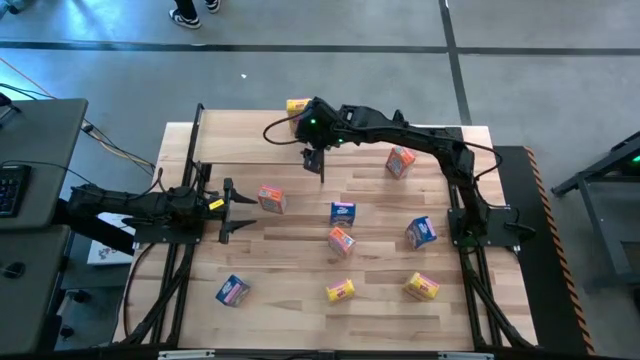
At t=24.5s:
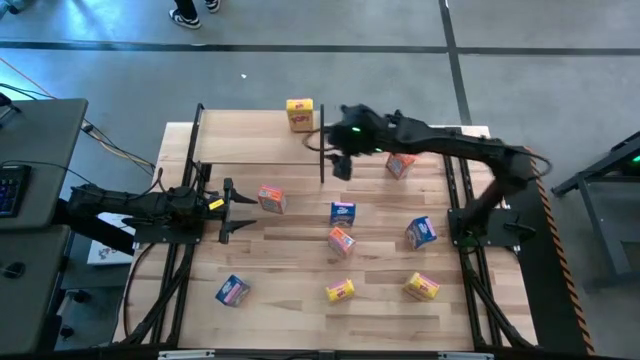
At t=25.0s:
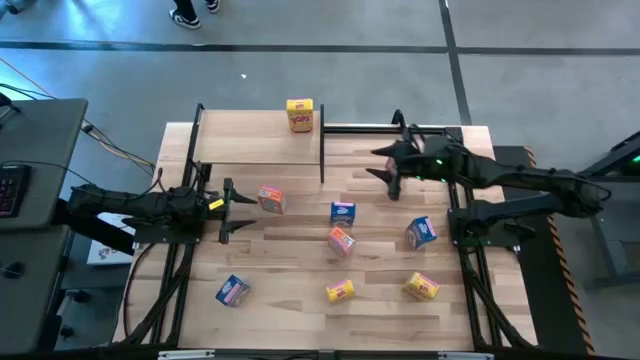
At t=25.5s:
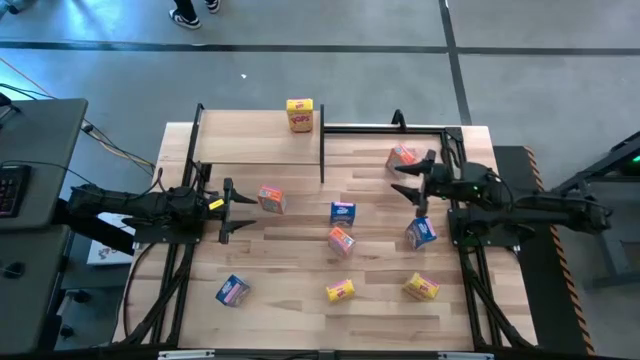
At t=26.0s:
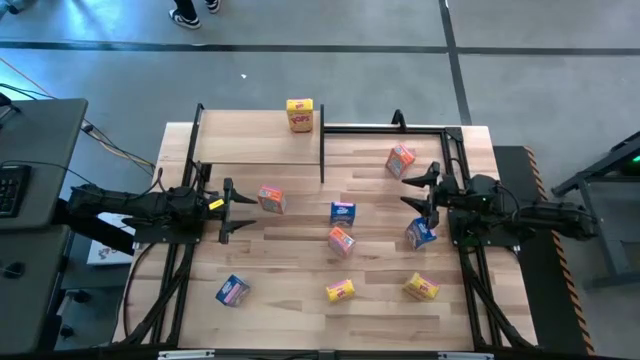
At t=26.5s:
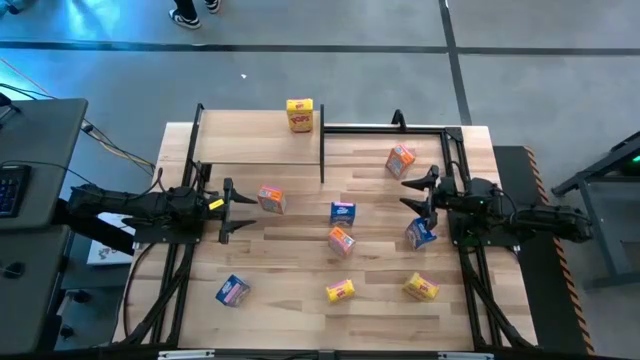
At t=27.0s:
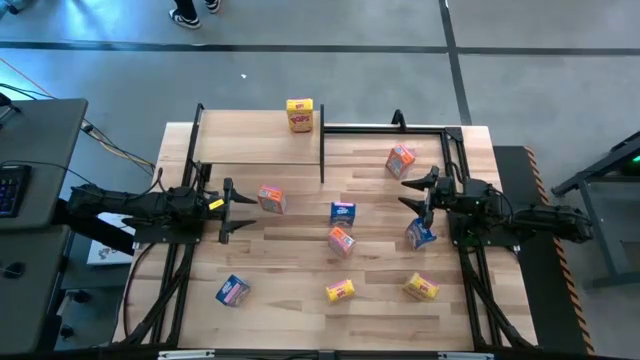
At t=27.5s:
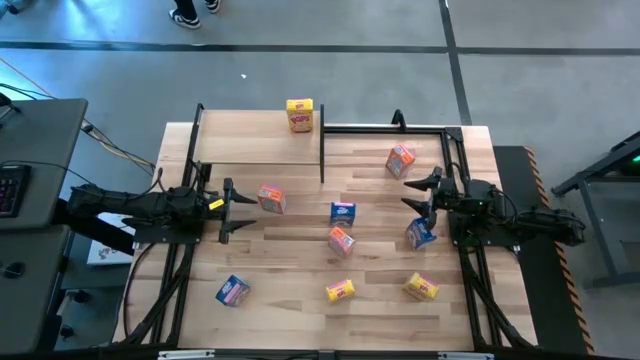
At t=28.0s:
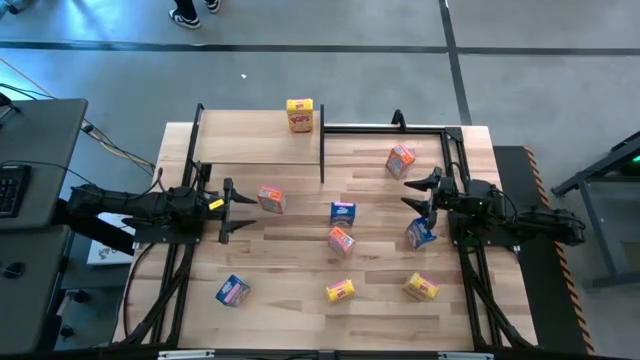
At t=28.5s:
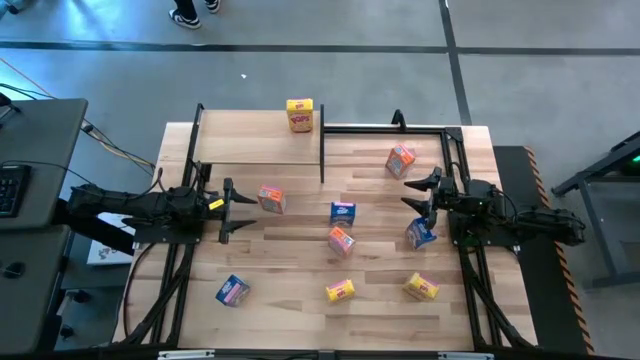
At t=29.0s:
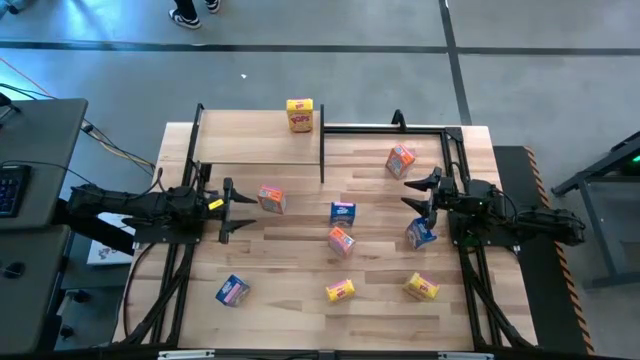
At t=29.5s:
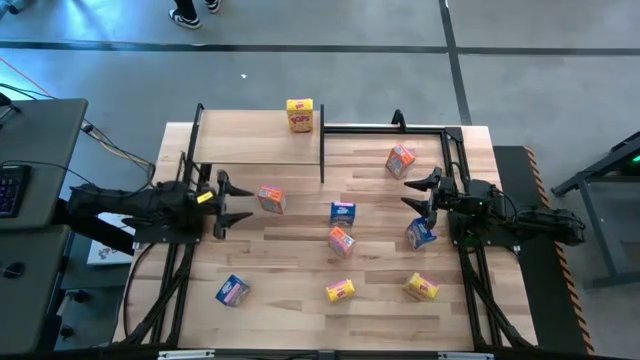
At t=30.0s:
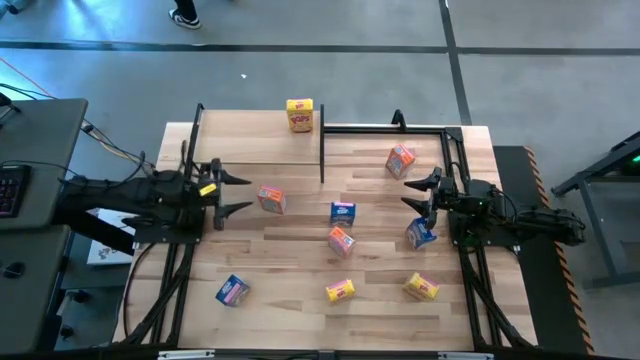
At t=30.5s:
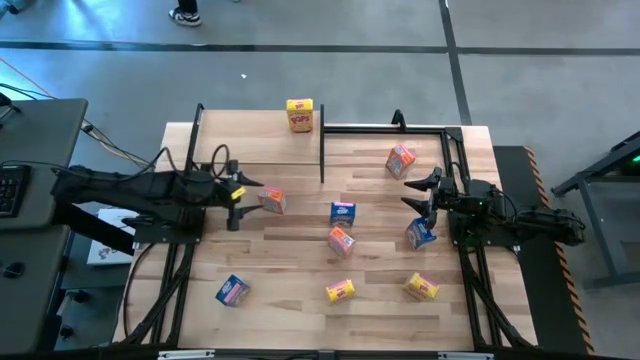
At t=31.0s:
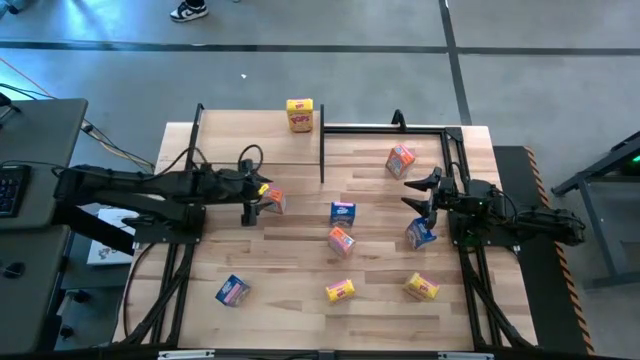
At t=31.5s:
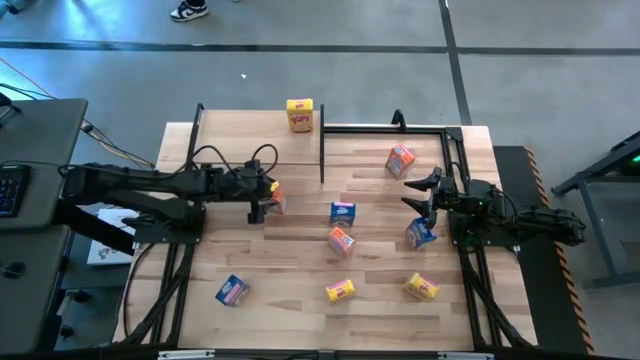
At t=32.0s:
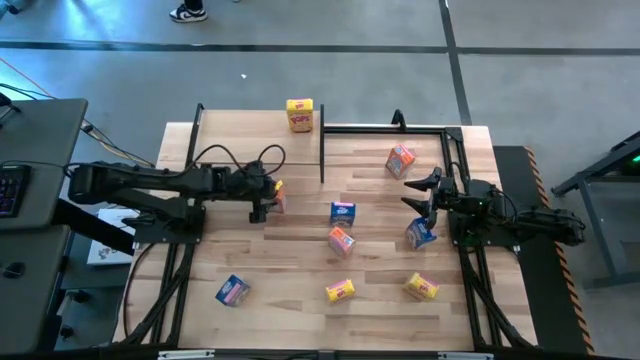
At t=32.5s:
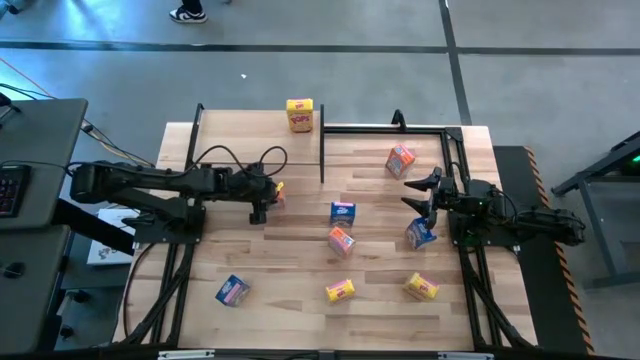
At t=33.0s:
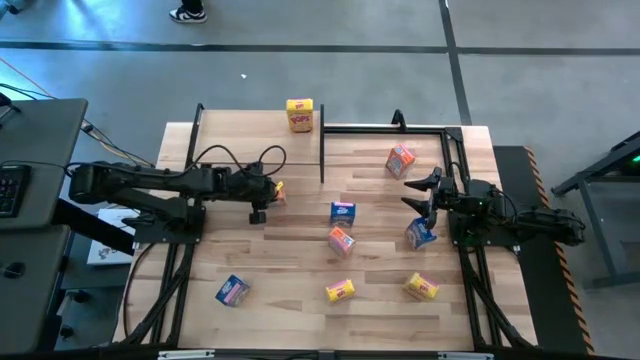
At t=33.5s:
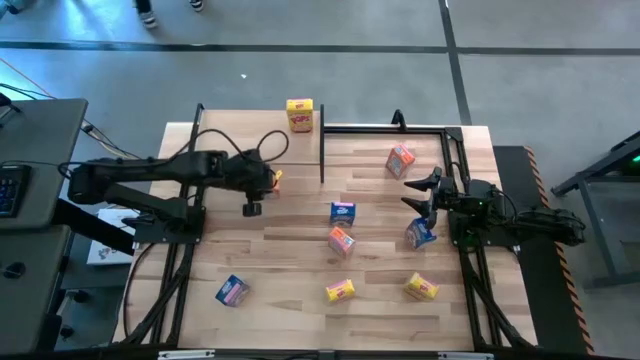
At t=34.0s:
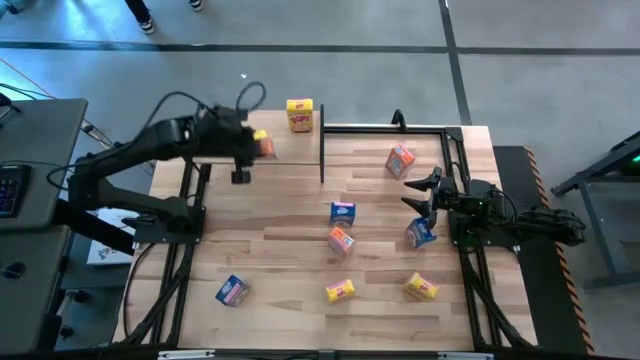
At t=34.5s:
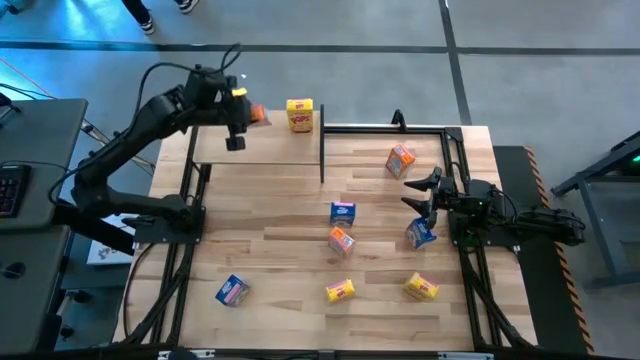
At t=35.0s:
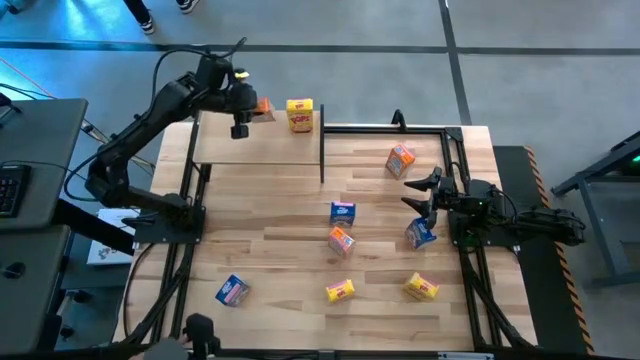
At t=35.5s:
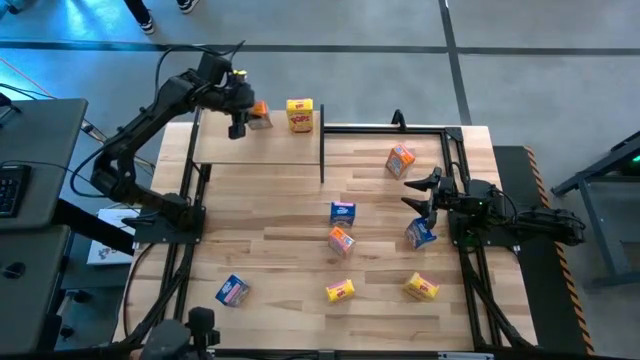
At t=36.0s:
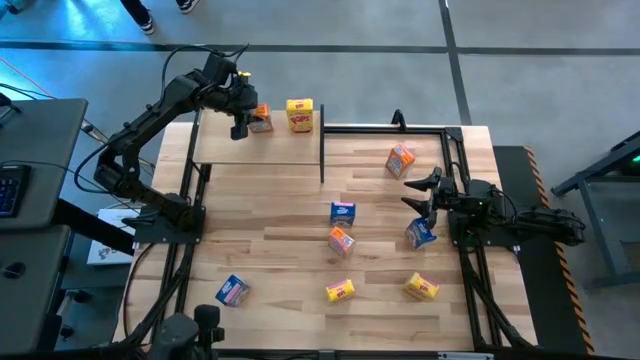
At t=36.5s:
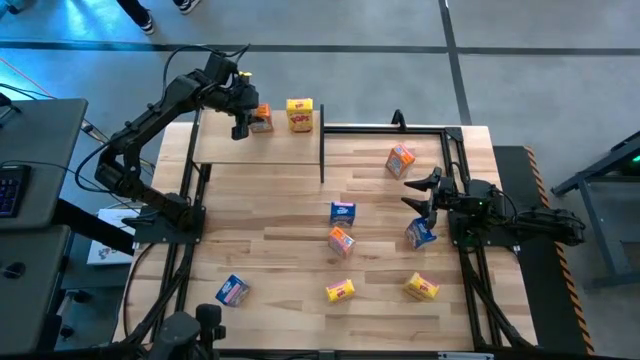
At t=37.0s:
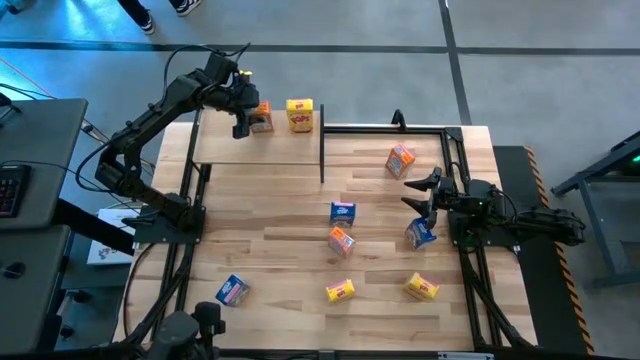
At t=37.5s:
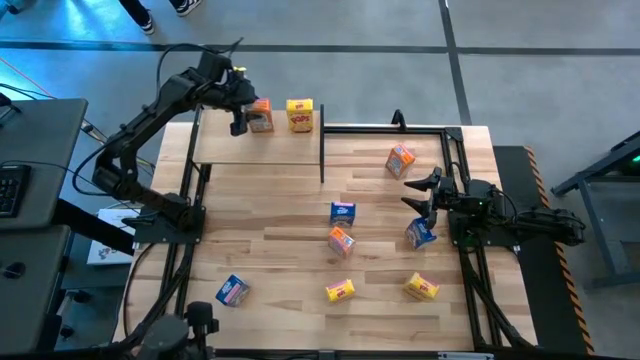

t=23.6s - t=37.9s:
Task: Stack cereal on shelf
Put the left orange cereal box on the shelf

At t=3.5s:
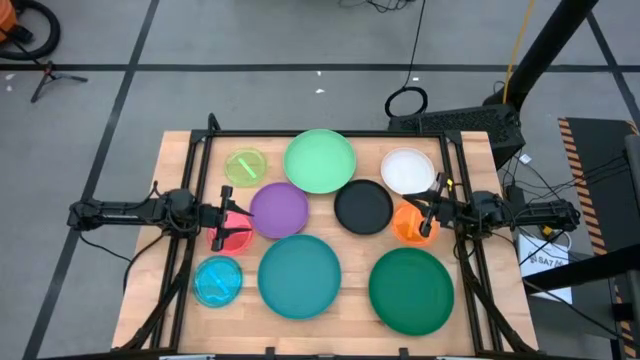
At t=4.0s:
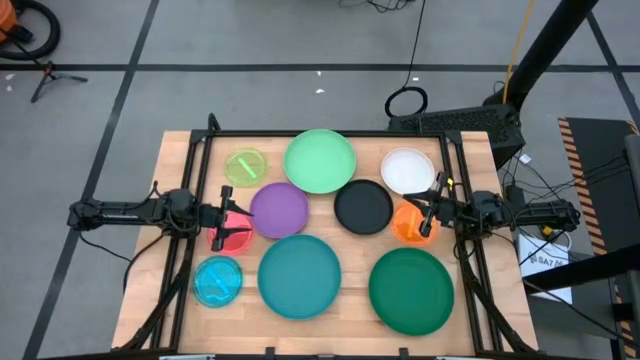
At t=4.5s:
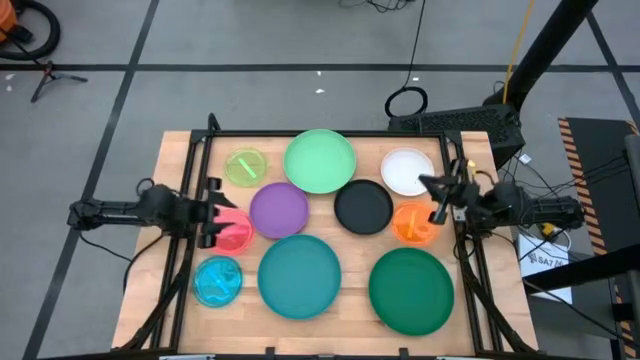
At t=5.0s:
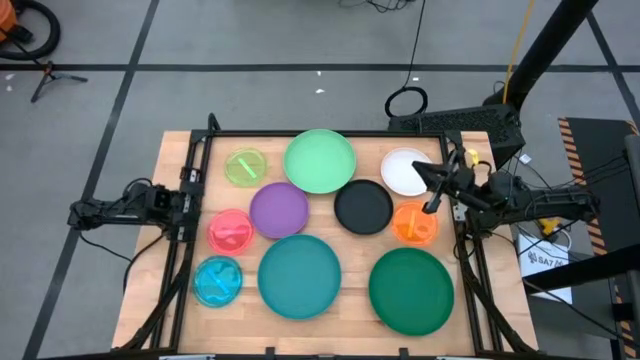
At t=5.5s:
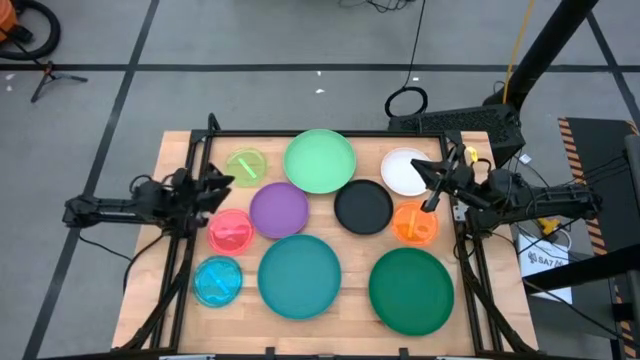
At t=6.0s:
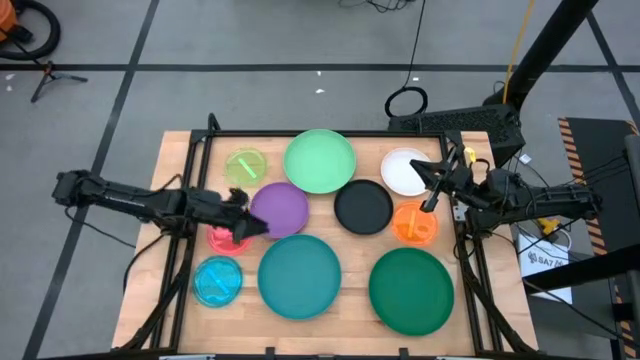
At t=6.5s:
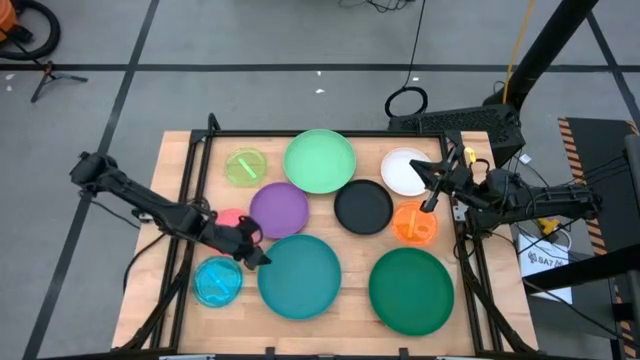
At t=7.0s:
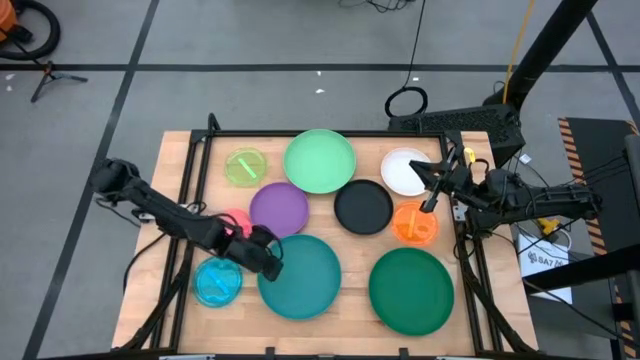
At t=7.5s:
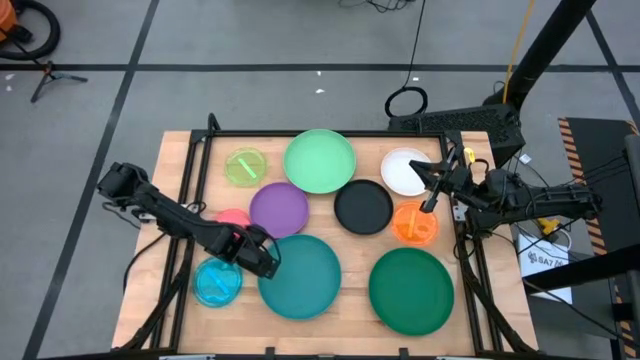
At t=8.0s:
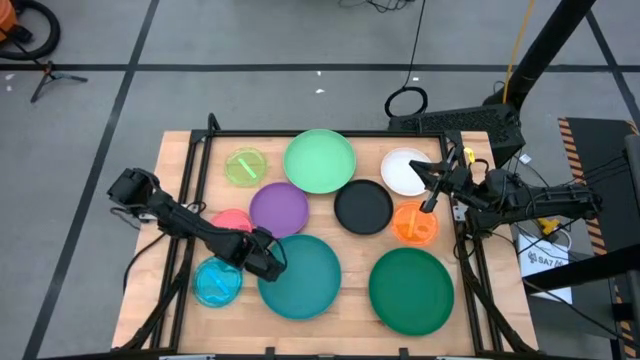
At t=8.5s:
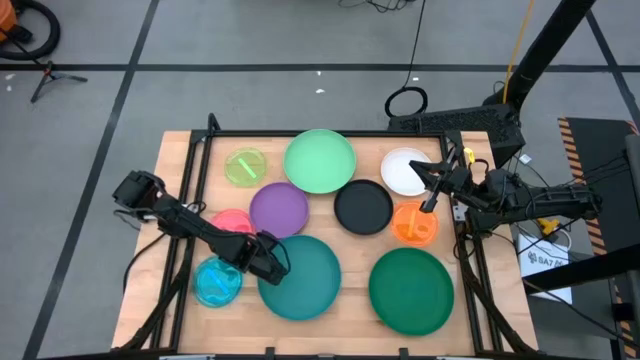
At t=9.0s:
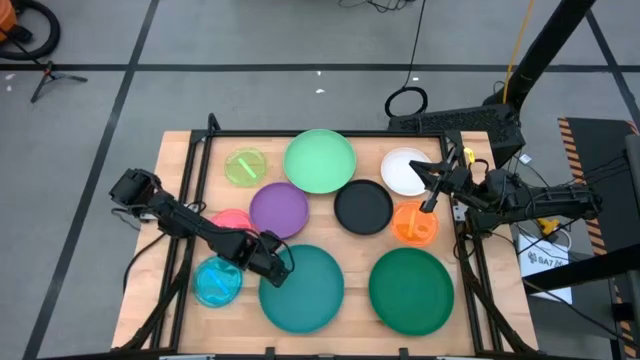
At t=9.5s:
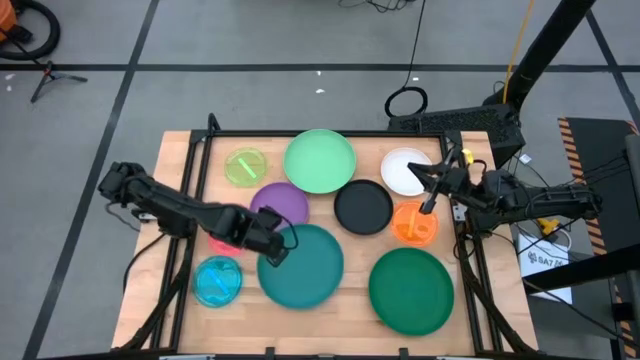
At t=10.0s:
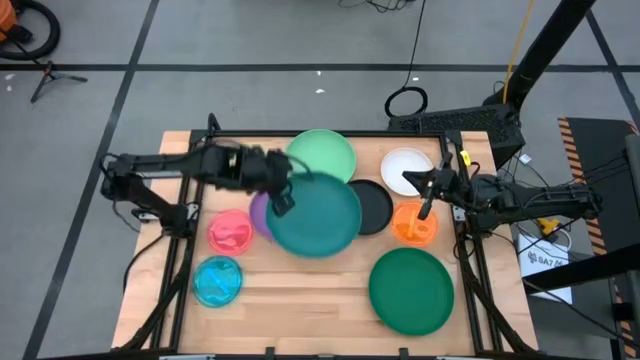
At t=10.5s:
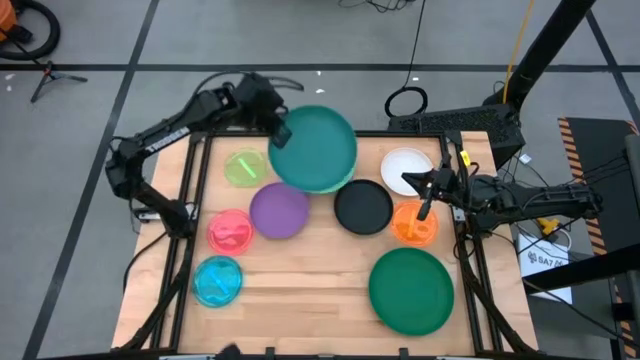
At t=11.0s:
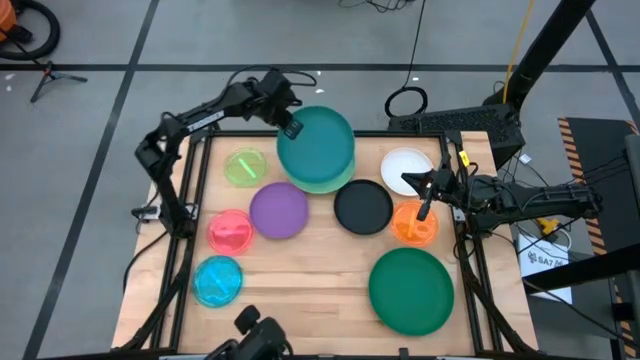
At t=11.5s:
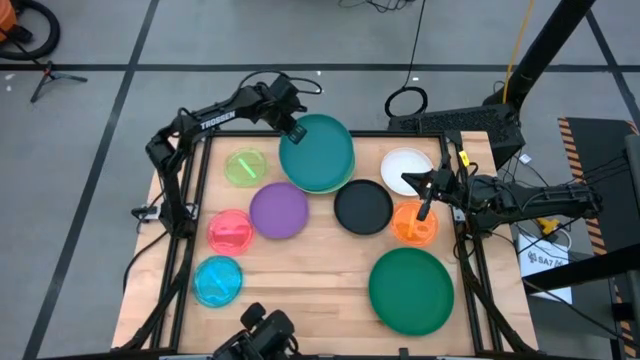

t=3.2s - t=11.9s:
Task: Stack plastic plates
Stack the blue plate on top of the green plate
